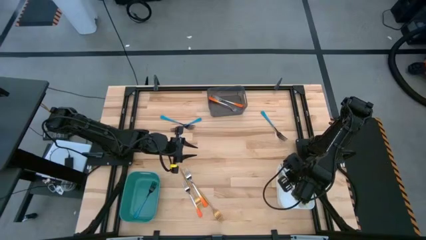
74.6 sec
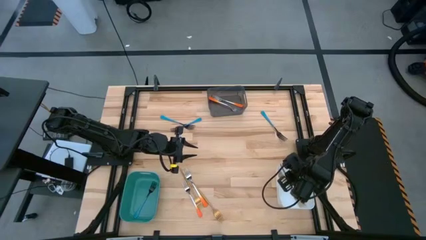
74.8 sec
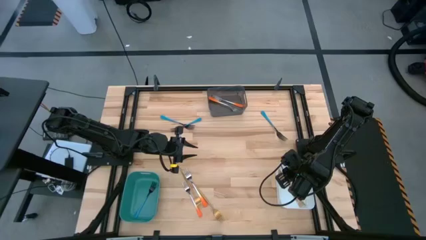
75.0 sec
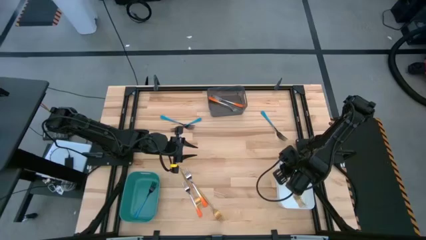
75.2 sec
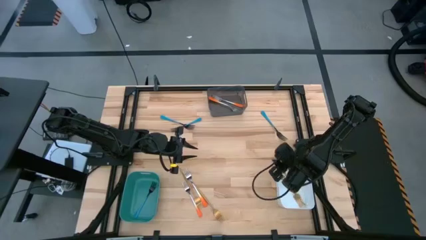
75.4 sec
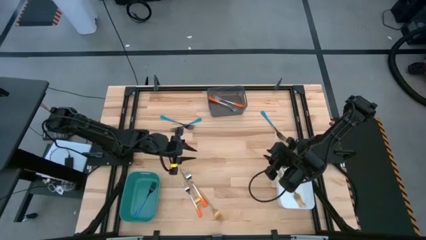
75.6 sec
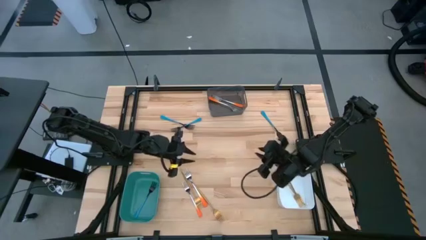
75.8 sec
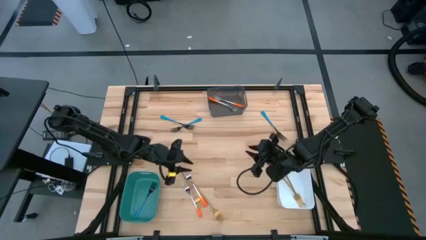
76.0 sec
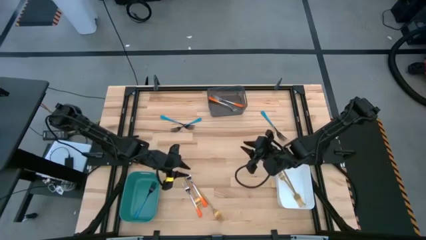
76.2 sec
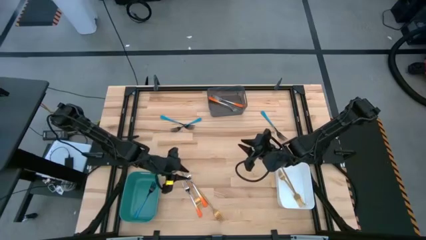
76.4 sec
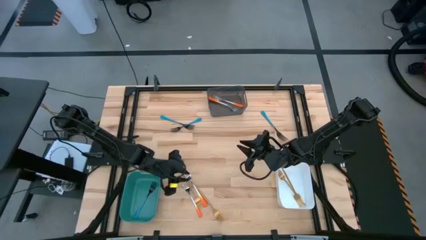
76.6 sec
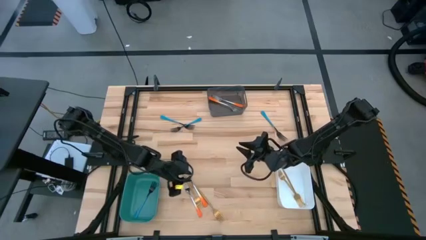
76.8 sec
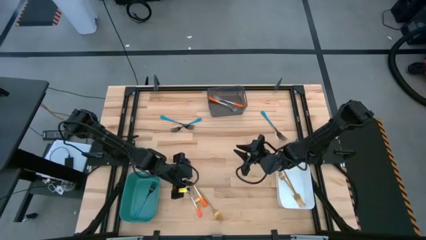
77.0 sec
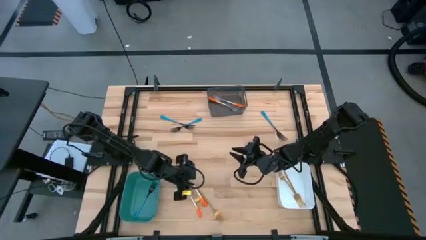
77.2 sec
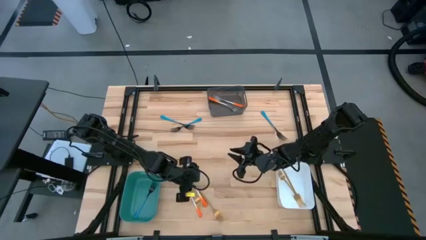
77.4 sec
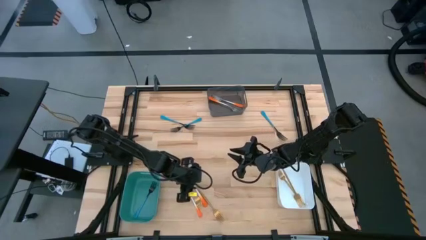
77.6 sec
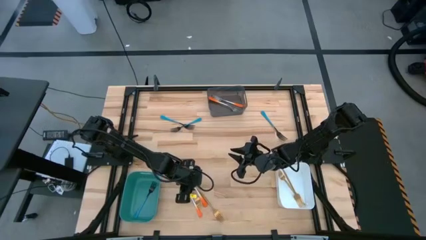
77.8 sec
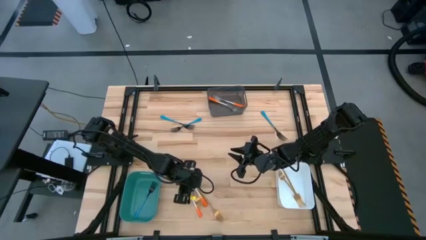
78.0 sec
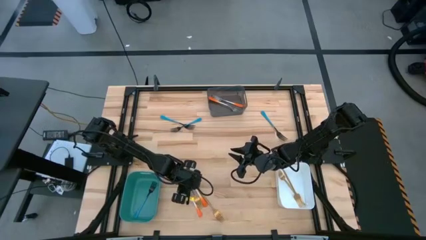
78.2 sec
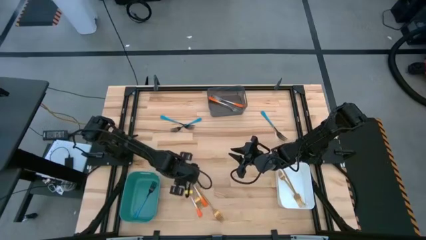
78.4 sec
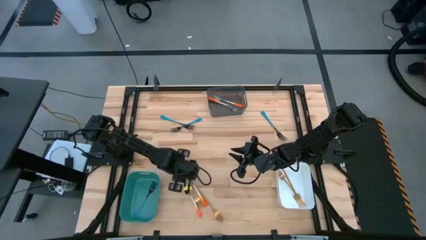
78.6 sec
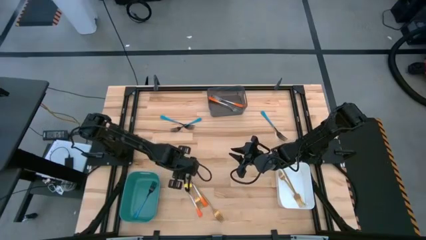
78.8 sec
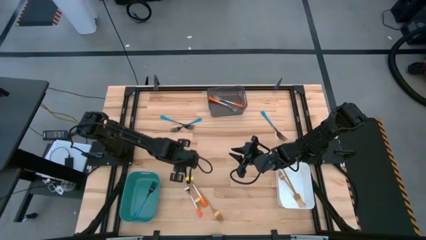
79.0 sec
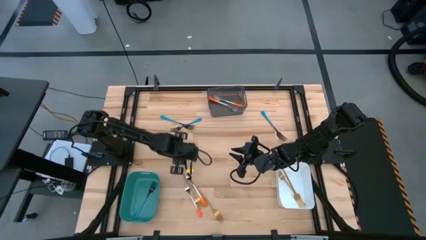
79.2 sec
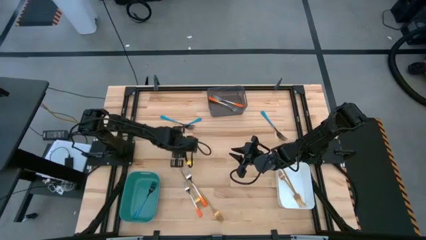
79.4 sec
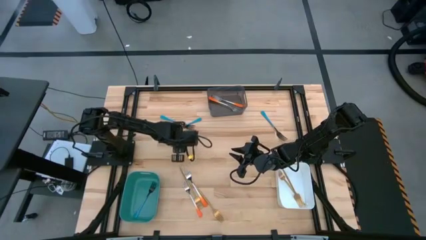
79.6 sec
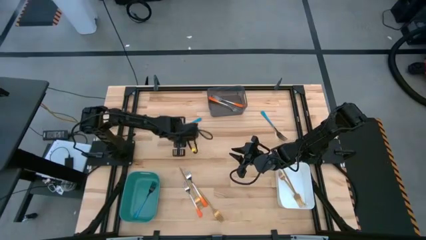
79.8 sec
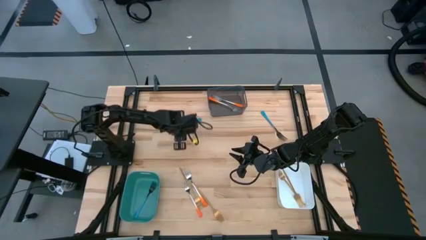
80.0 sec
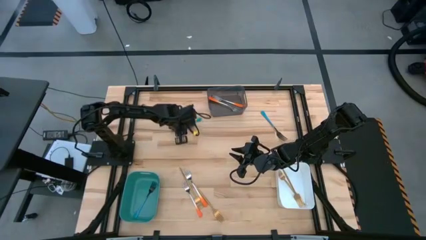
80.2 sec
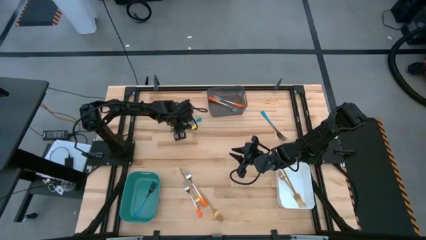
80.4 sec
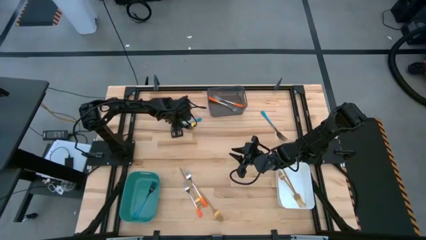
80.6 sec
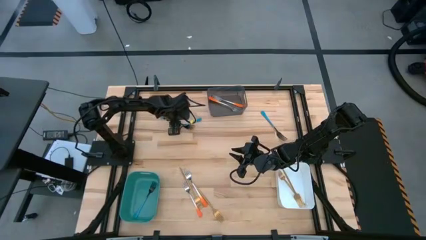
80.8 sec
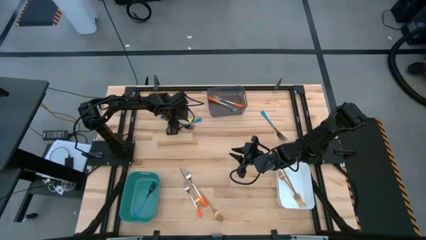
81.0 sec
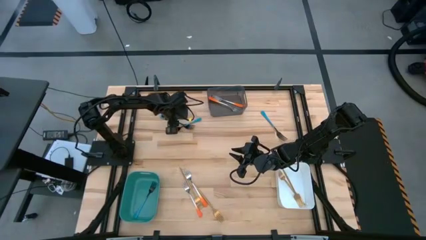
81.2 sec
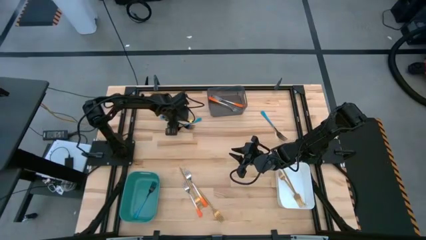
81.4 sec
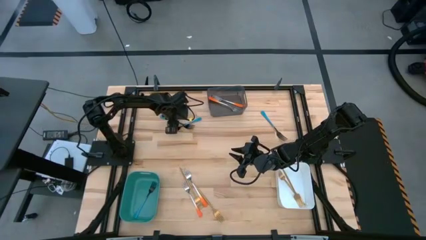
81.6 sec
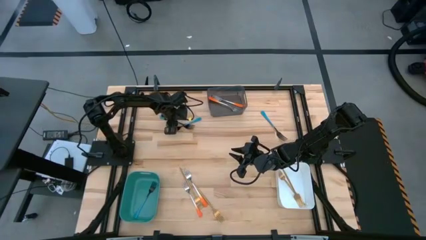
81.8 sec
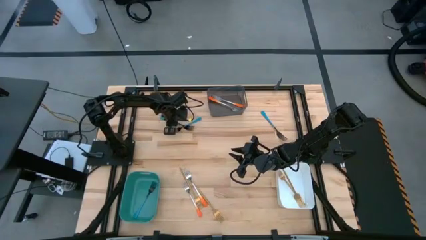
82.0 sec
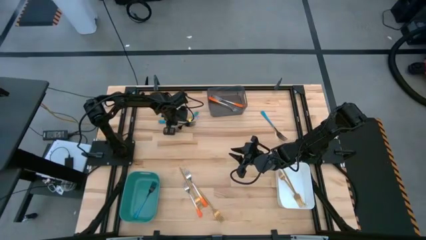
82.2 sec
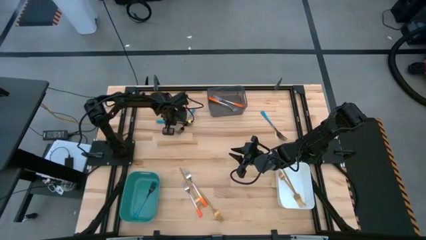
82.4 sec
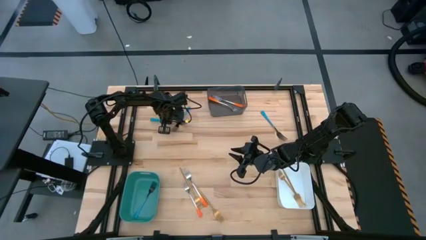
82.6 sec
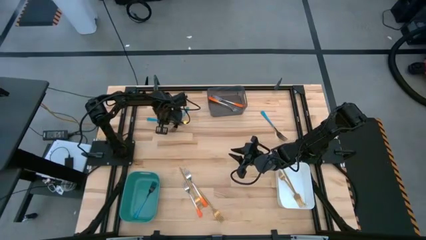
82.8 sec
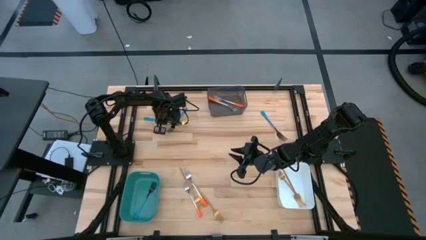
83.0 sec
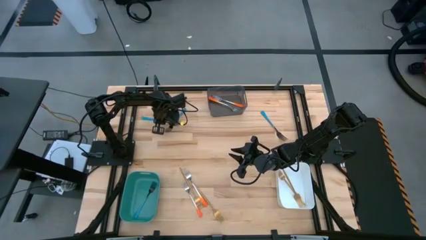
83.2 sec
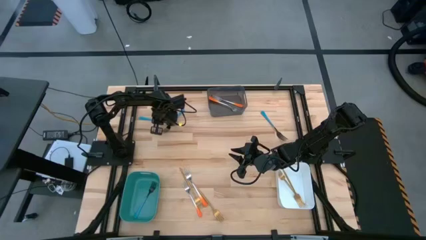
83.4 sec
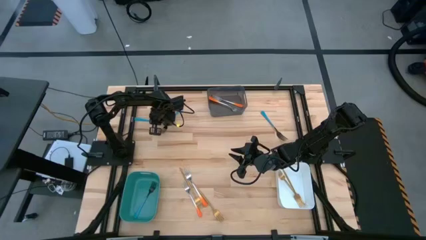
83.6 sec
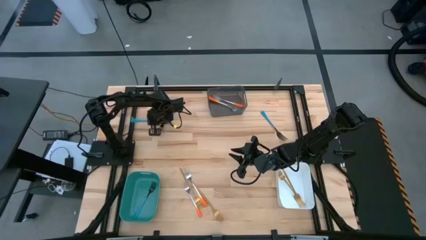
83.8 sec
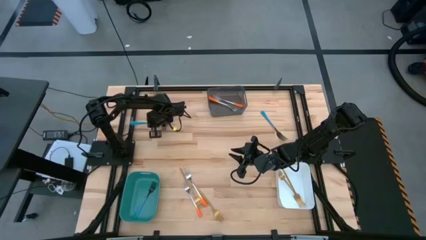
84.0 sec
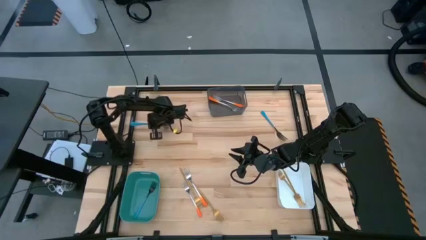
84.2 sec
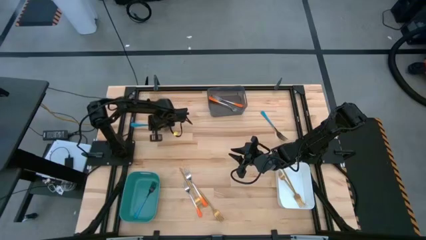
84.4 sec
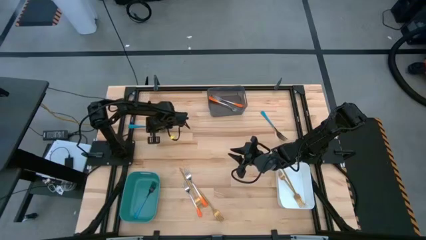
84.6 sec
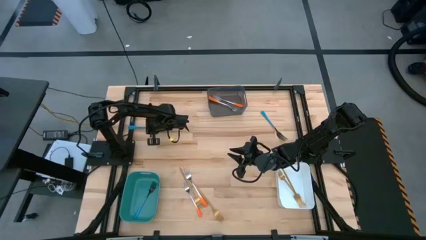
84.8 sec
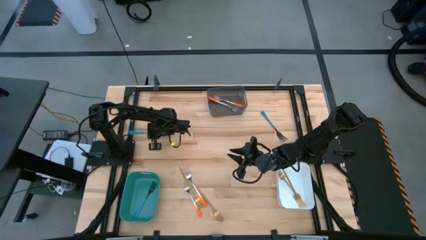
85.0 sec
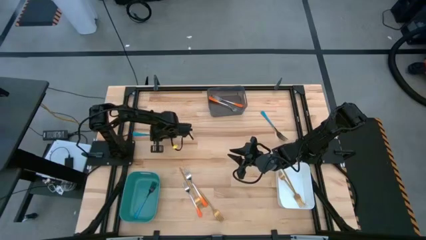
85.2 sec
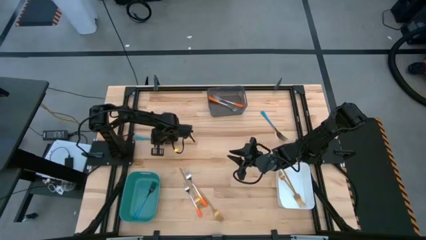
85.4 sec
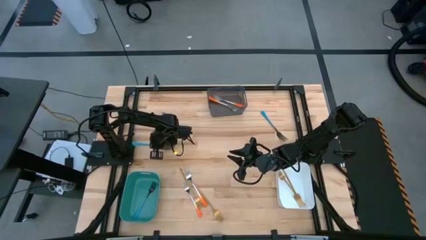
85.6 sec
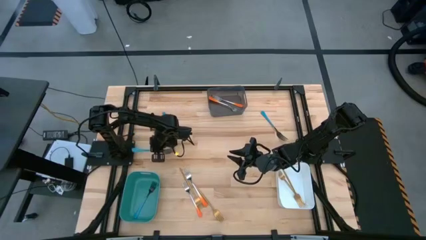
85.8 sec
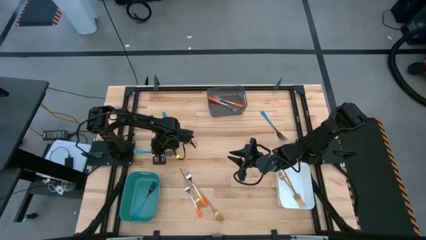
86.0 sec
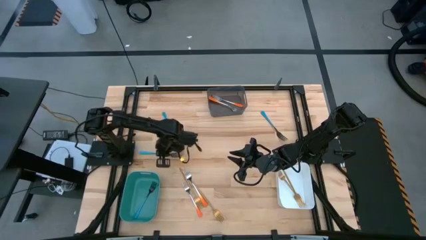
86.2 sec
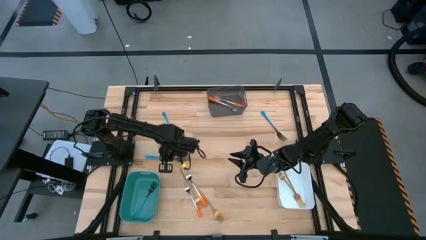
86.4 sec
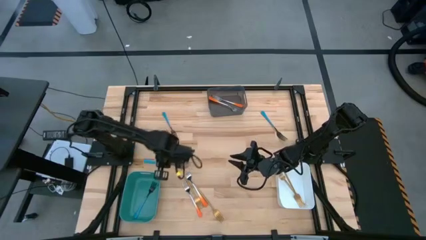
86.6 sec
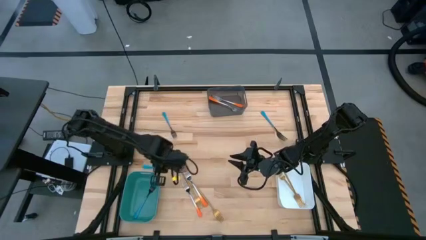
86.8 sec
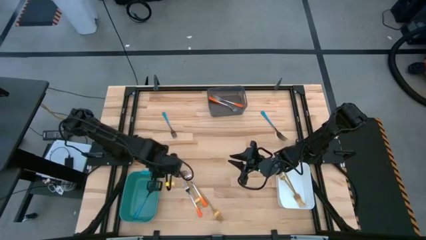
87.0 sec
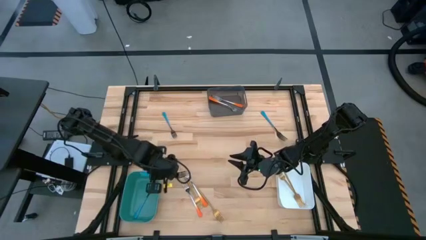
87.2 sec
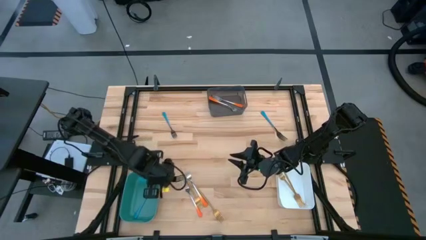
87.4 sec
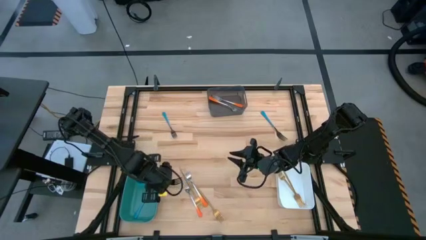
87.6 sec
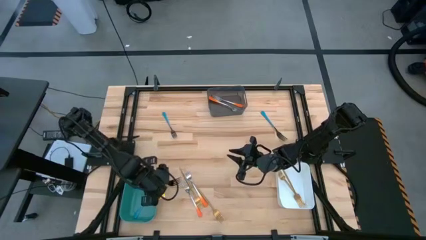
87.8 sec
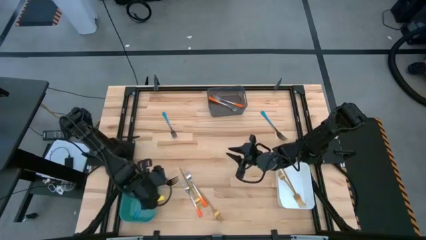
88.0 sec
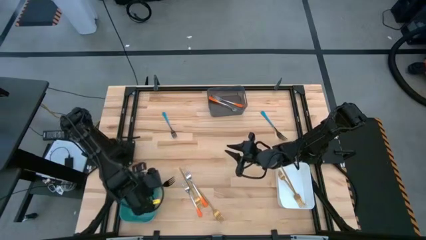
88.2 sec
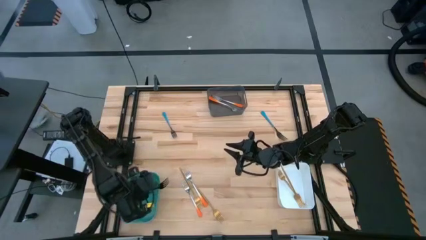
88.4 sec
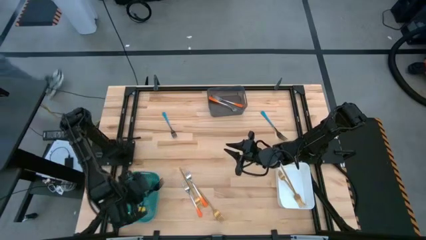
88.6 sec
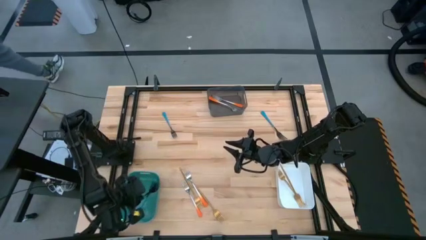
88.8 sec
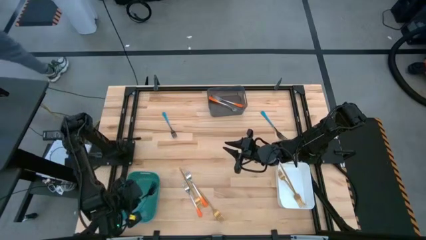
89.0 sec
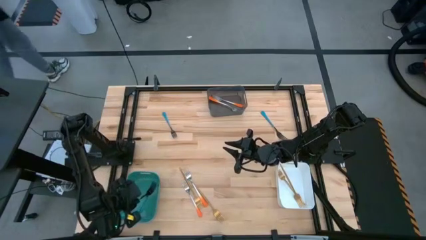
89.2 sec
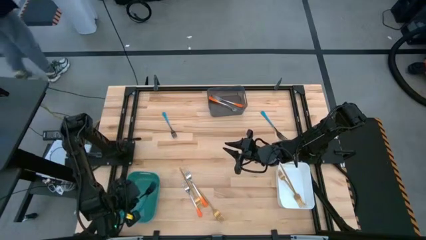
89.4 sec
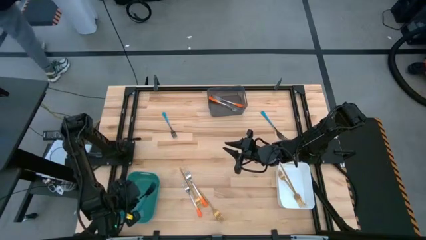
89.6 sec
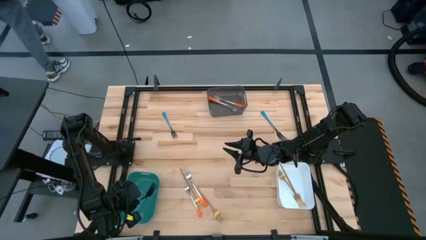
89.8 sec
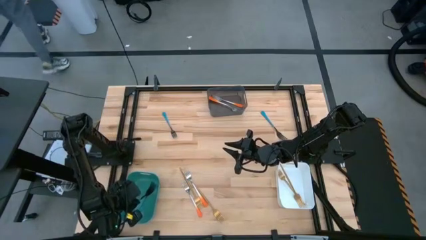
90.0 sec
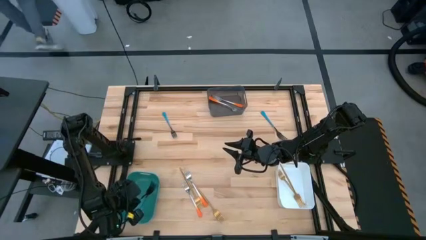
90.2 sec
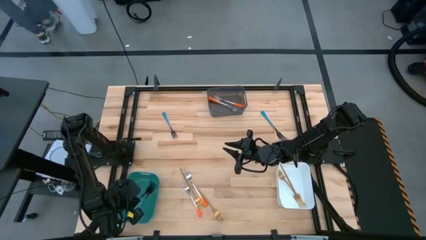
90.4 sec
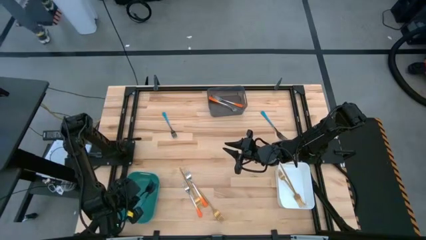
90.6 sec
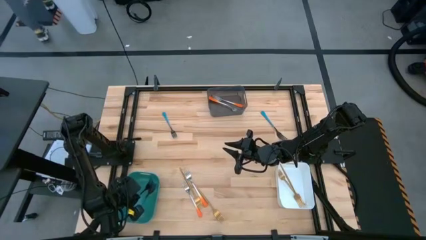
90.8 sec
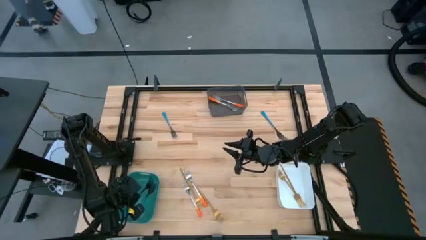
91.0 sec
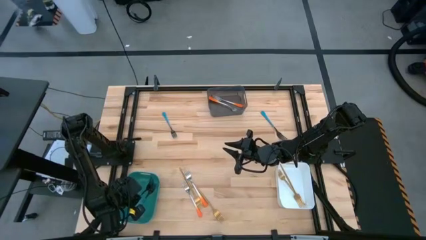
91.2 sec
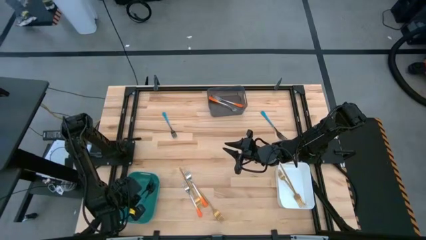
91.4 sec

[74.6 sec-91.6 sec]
Task: Sort silverware by color (type)
Put the blue fork into the green bin
